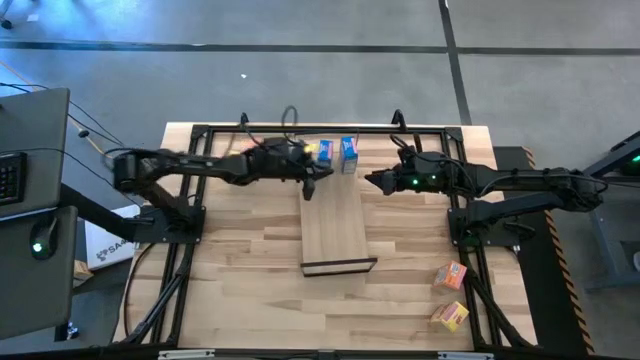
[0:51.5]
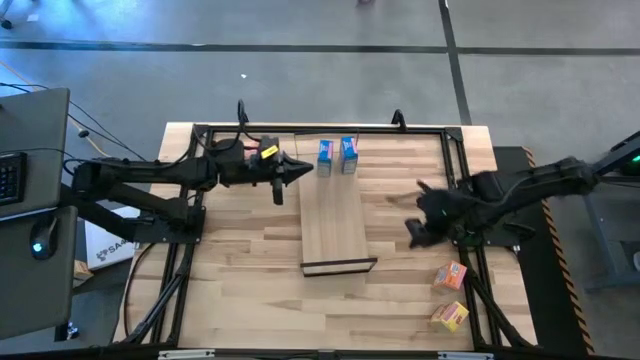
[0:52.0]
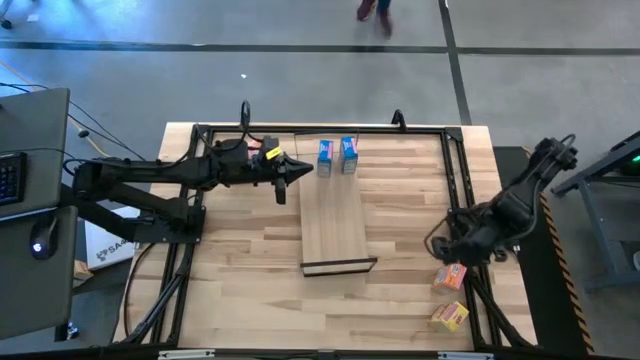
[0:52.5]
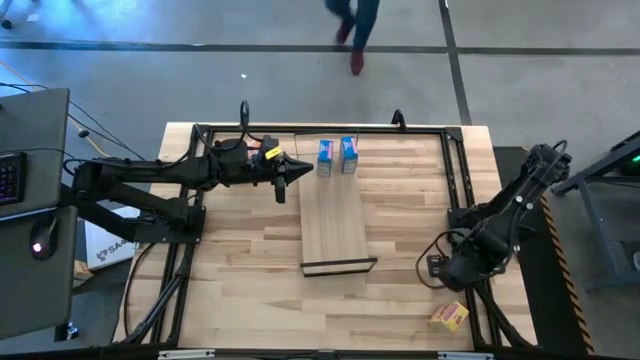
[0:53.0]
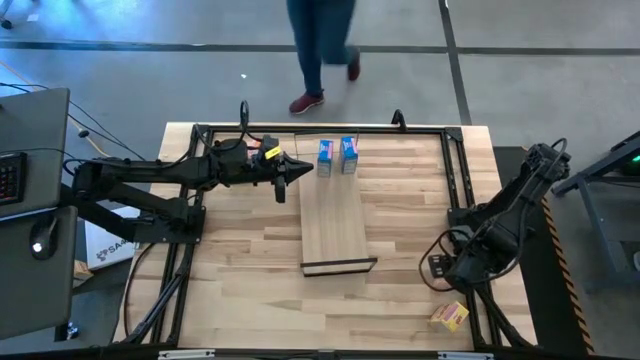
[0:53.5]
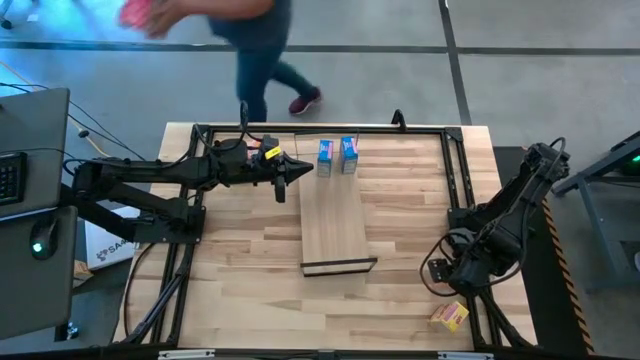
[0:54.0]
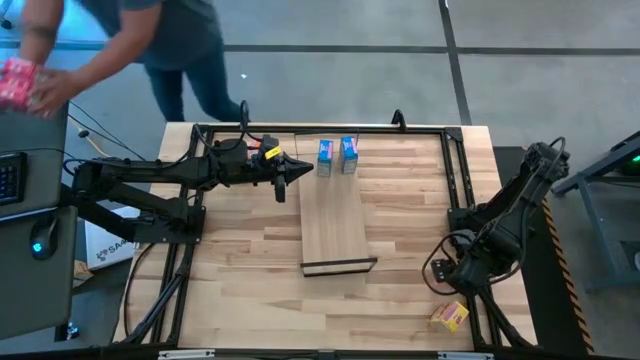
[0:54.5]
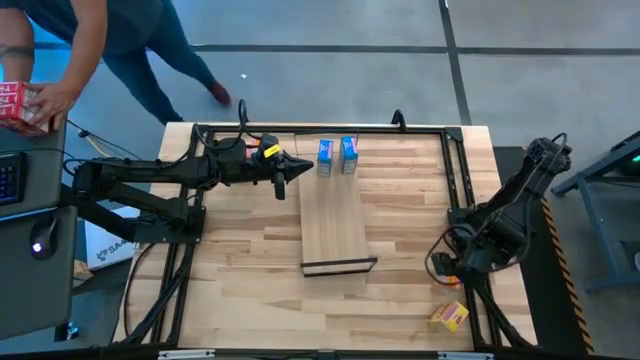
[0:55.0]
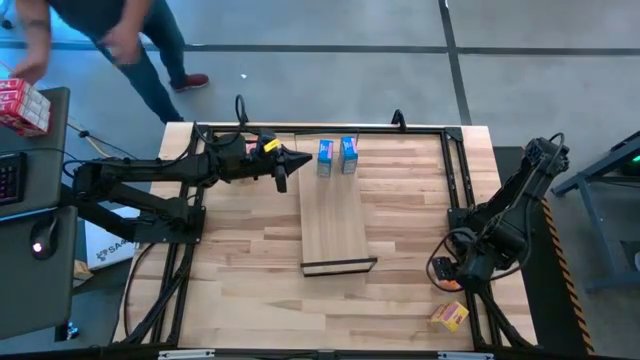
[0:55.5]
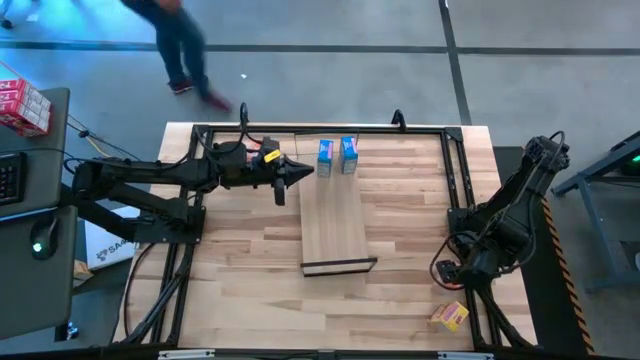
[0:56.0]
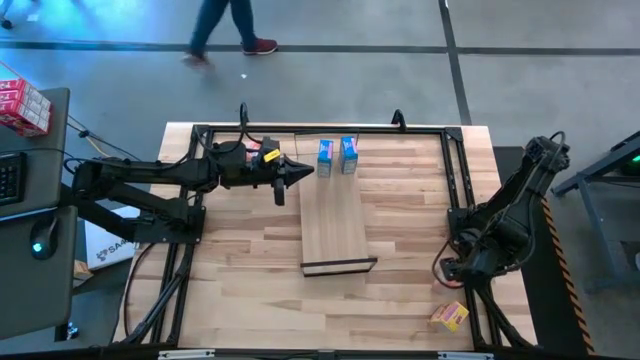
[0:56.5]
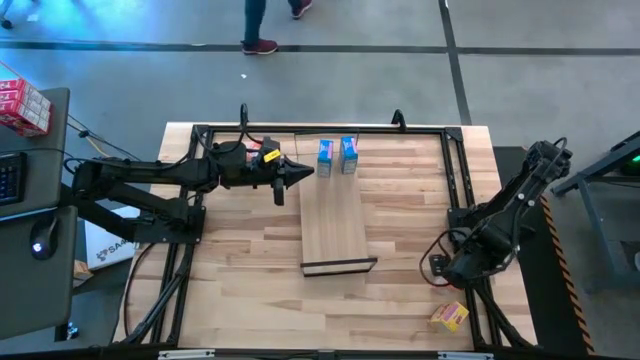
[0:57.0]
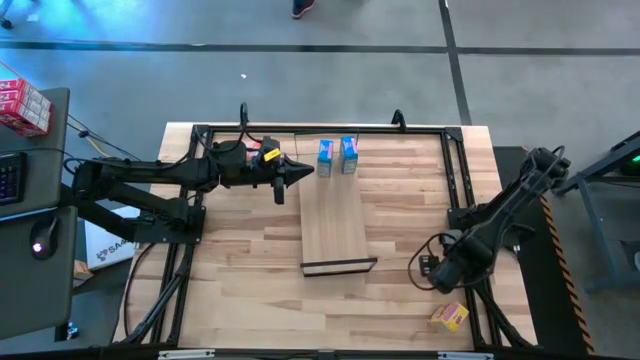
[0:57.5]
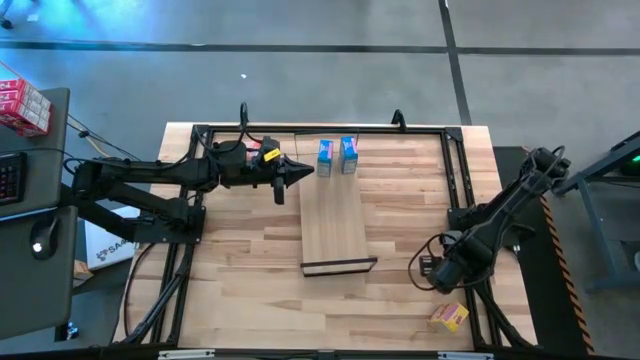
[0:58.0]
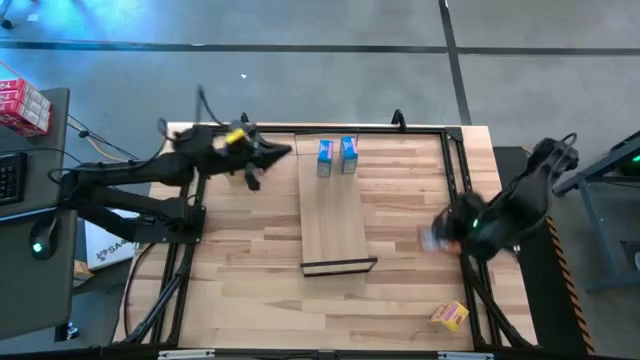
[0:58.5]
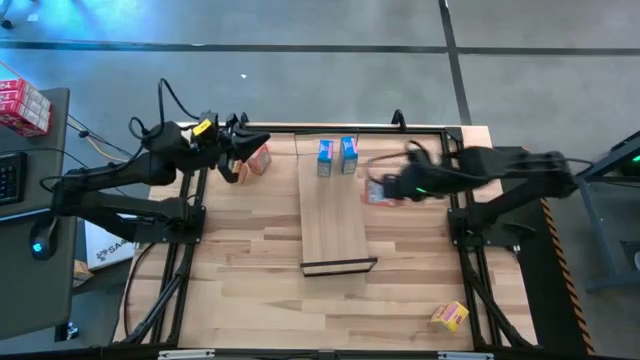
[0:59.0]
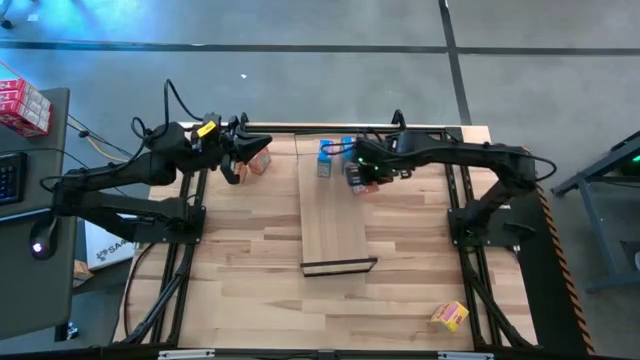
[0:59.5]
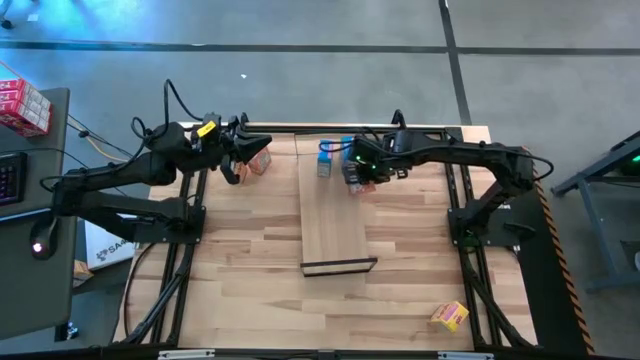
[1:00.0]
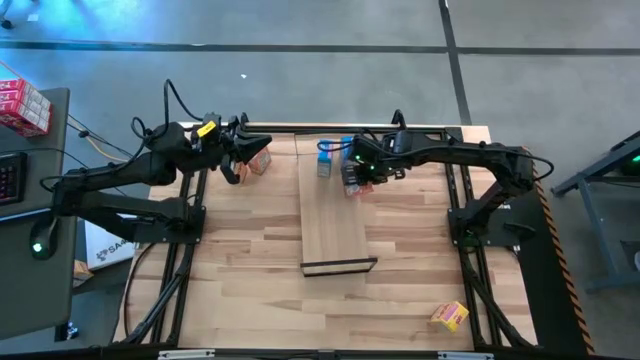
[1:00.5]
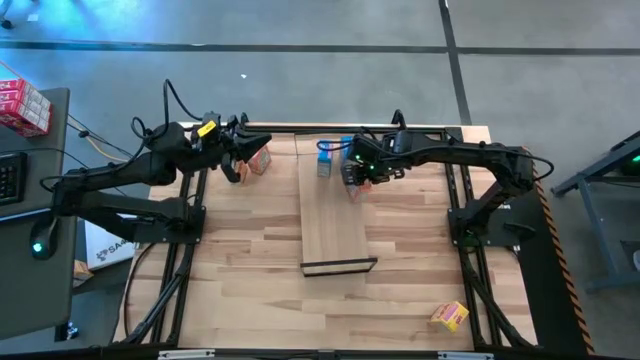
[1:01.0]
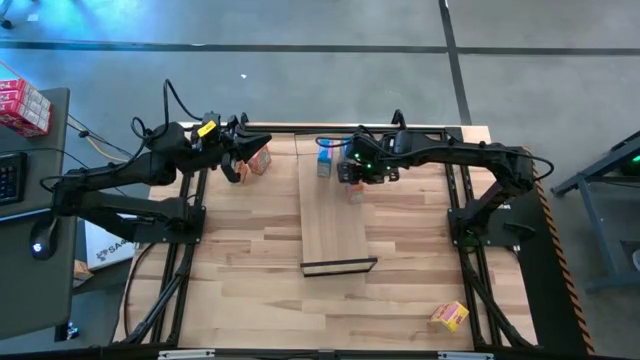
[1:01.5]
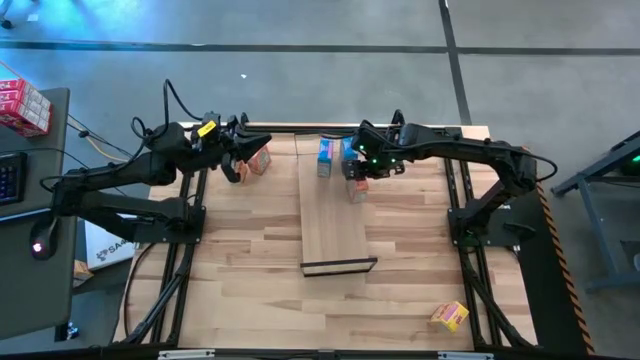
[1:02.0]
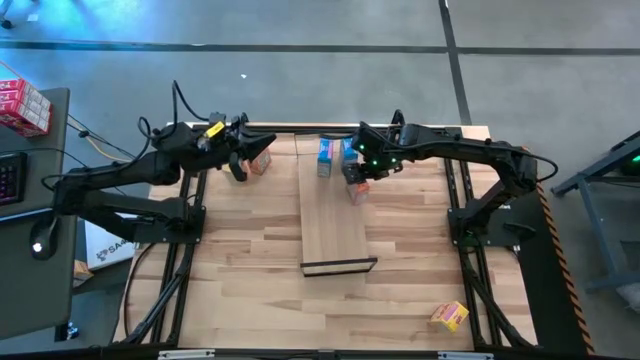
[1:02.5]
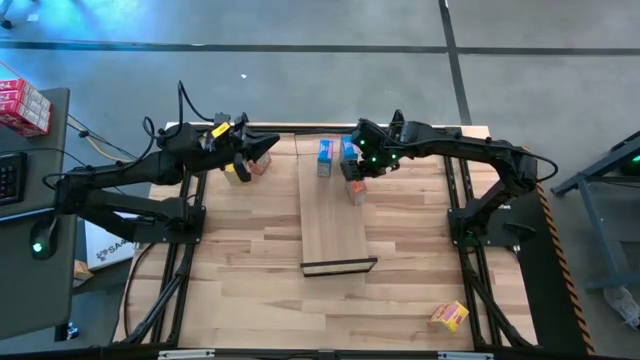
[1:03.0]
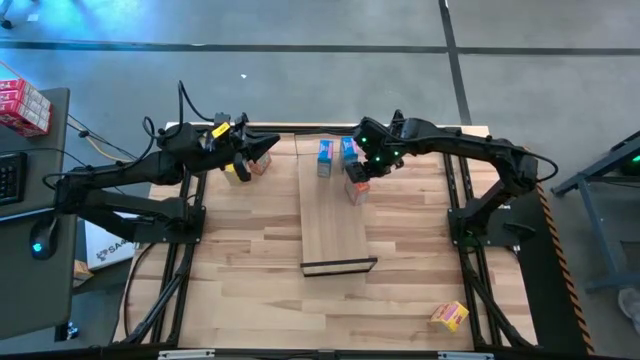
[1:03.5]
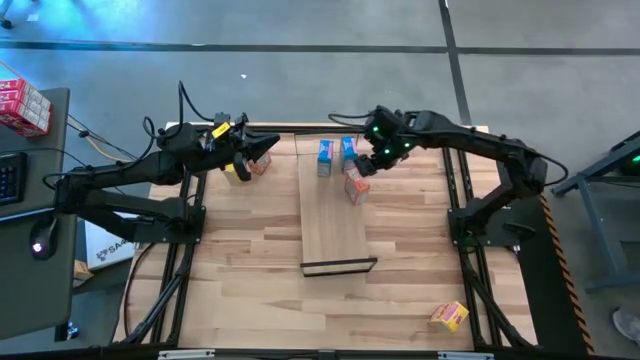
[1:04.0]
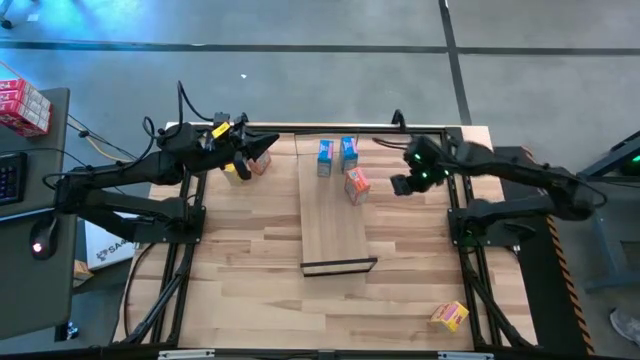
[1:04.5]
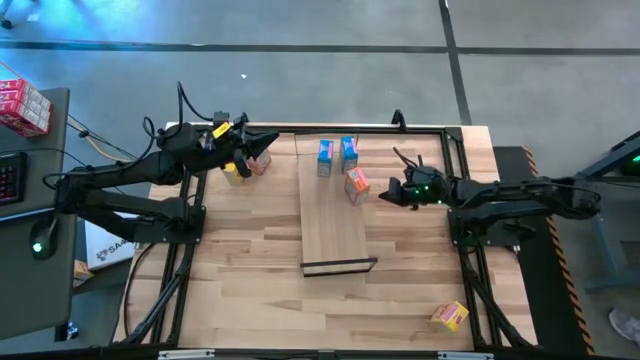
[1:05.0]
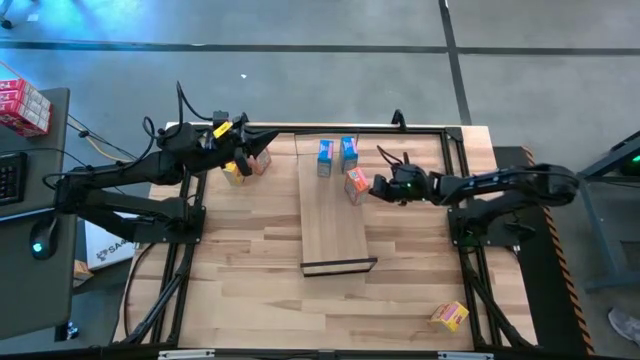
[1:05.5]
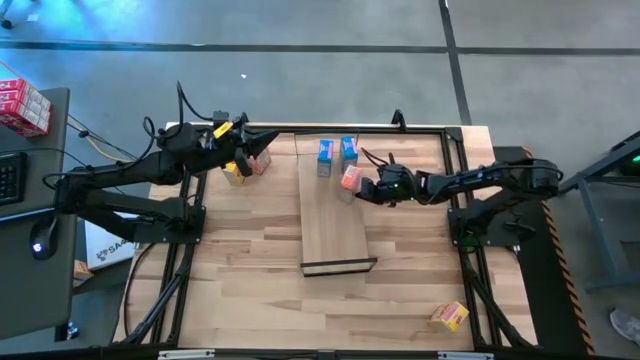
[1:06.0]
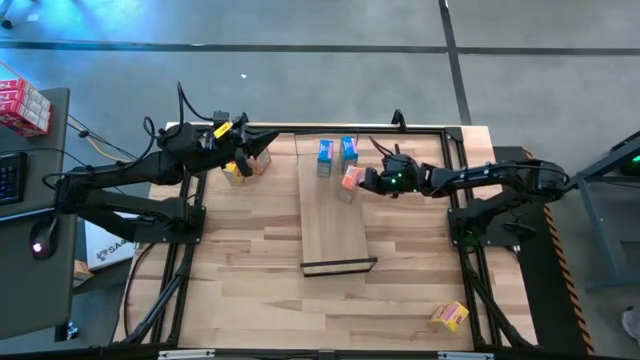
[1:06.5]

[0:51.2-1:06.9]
Task: Stack cereal on shelf
Put the bottom orange cereal box on the shelf
